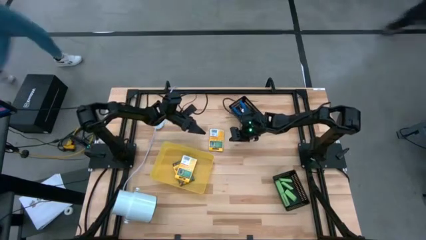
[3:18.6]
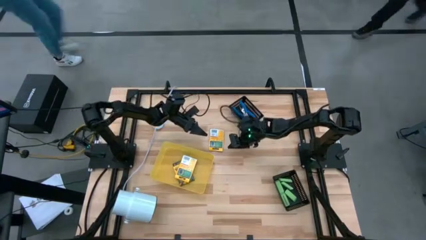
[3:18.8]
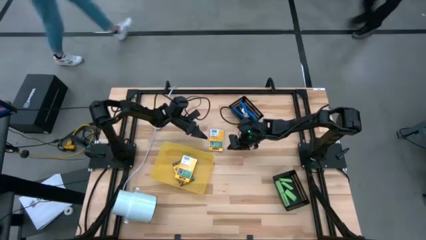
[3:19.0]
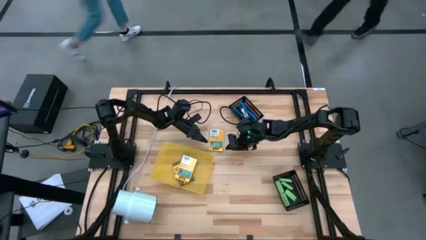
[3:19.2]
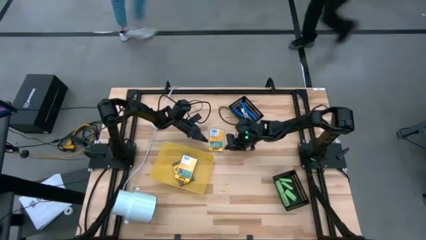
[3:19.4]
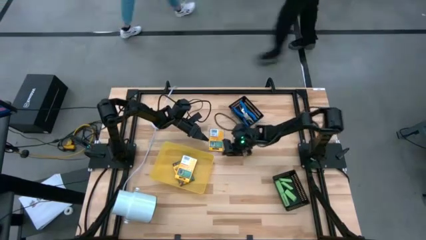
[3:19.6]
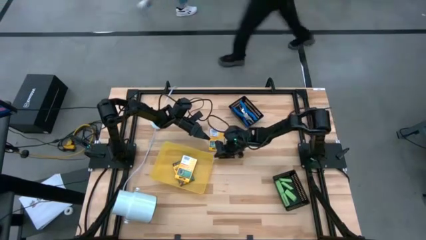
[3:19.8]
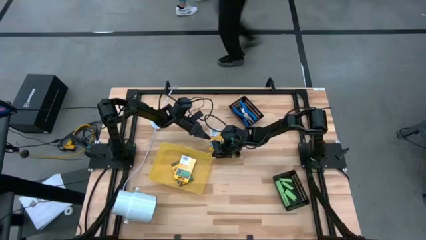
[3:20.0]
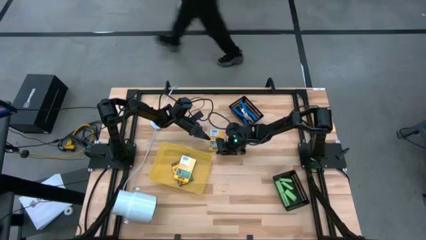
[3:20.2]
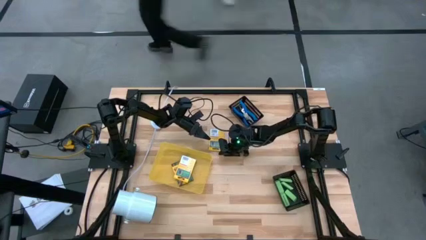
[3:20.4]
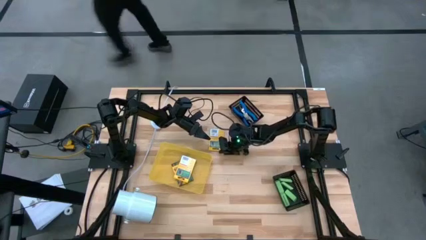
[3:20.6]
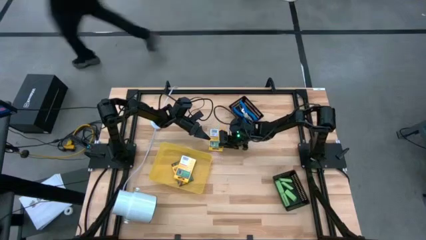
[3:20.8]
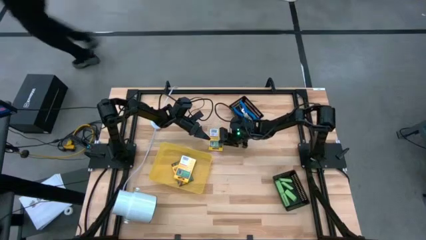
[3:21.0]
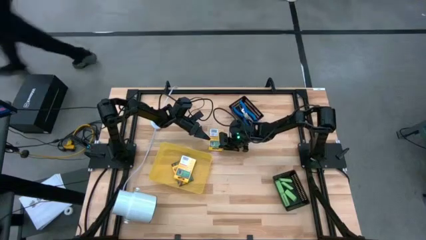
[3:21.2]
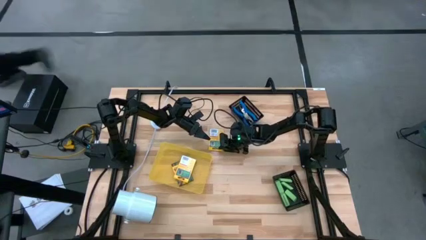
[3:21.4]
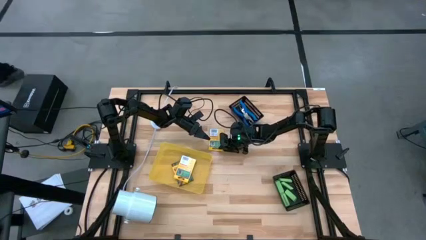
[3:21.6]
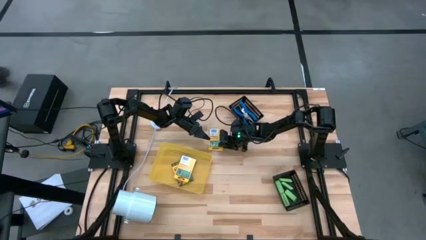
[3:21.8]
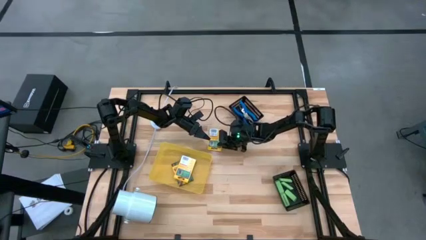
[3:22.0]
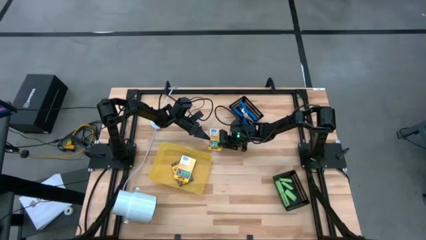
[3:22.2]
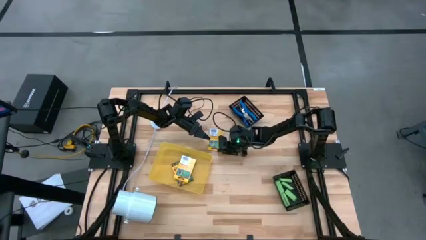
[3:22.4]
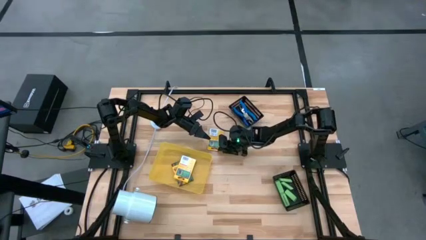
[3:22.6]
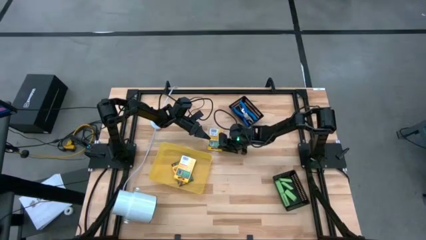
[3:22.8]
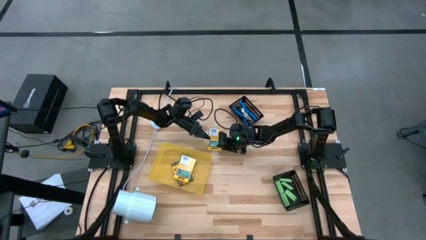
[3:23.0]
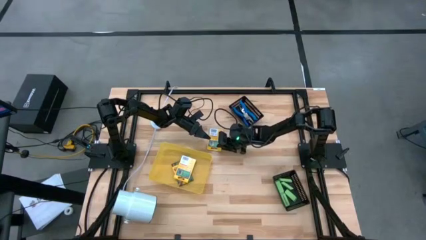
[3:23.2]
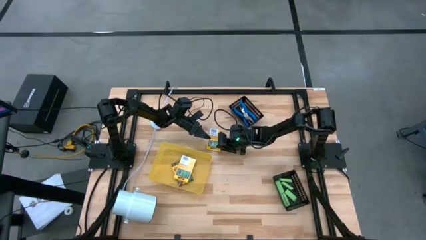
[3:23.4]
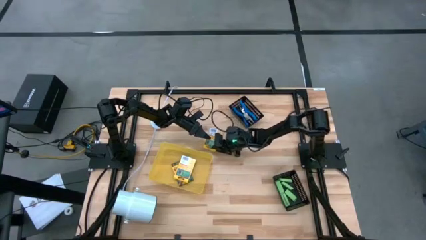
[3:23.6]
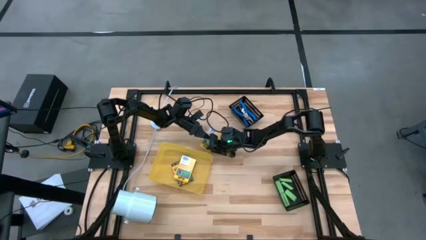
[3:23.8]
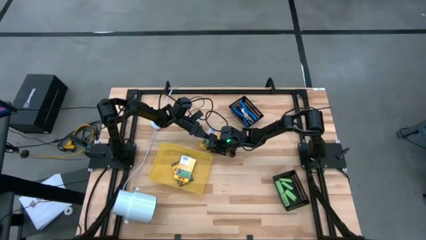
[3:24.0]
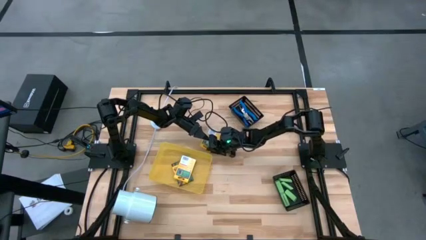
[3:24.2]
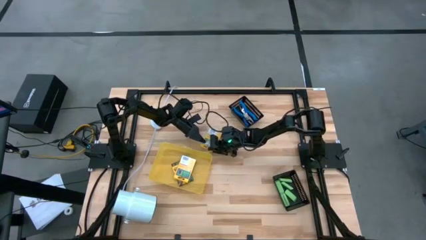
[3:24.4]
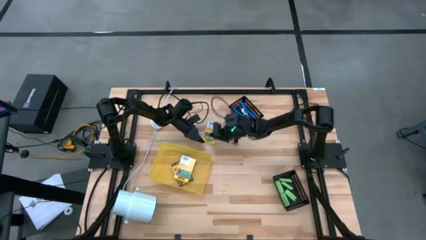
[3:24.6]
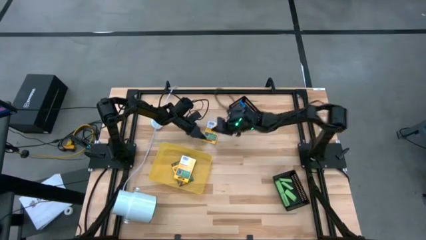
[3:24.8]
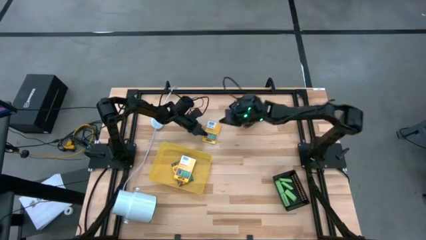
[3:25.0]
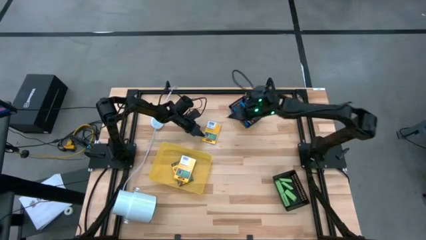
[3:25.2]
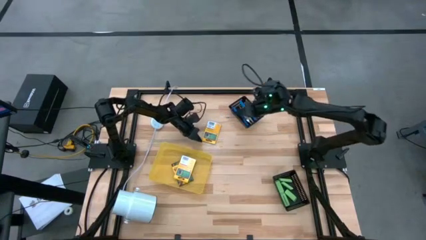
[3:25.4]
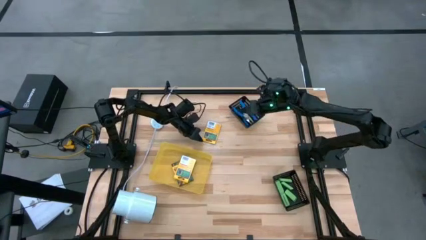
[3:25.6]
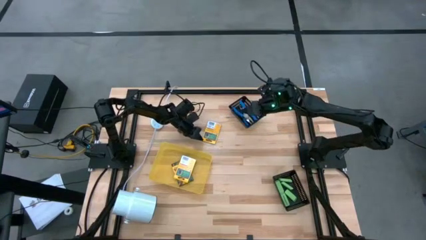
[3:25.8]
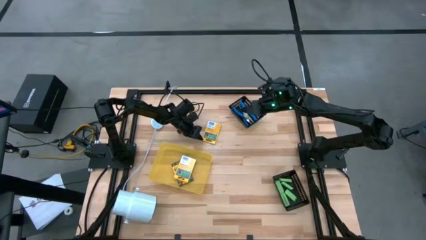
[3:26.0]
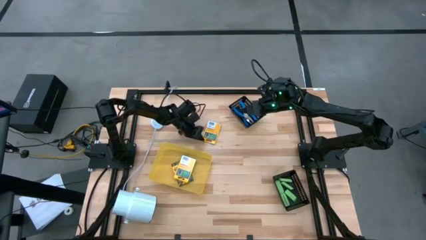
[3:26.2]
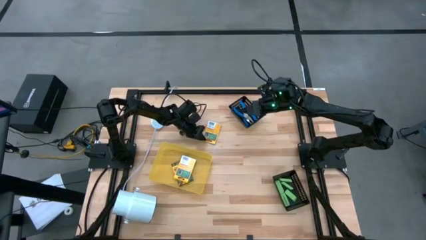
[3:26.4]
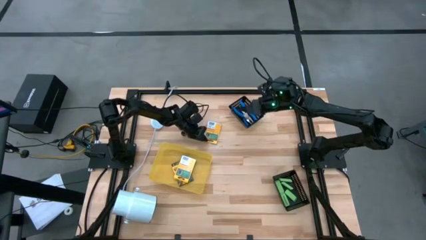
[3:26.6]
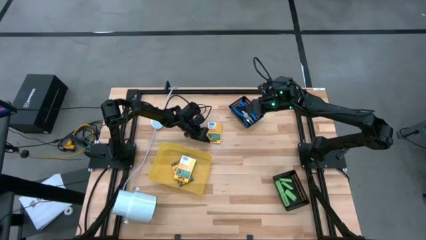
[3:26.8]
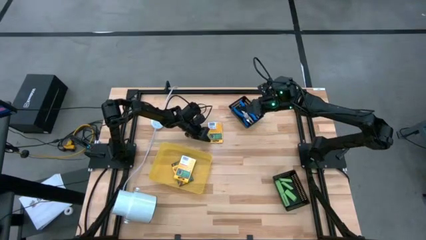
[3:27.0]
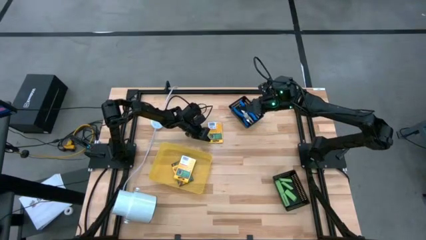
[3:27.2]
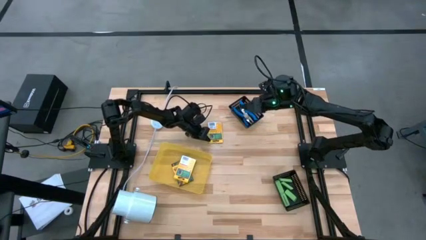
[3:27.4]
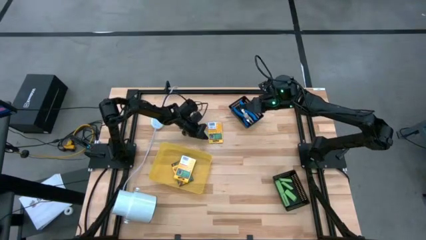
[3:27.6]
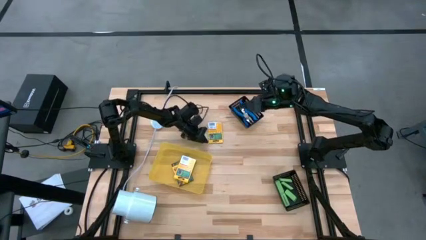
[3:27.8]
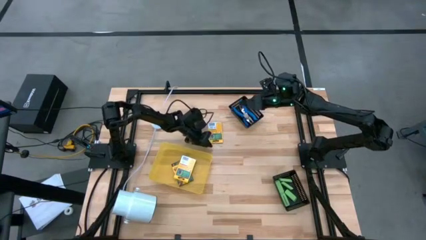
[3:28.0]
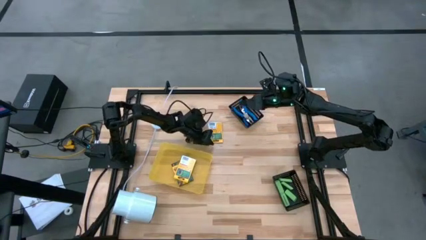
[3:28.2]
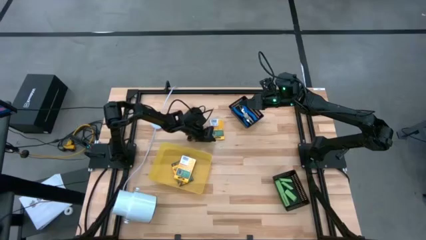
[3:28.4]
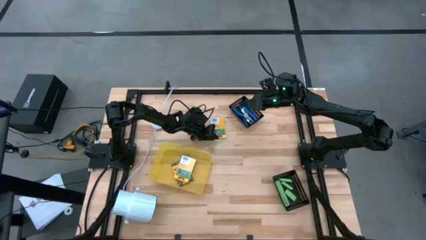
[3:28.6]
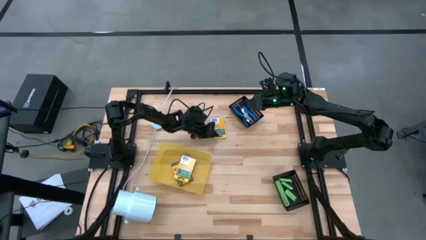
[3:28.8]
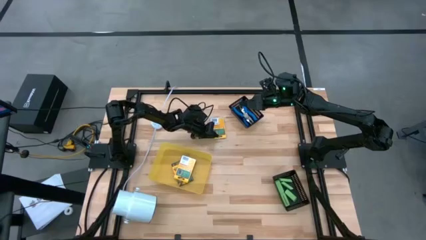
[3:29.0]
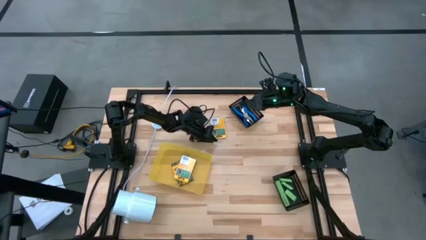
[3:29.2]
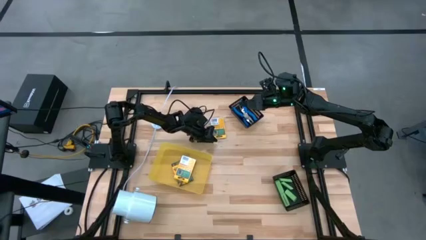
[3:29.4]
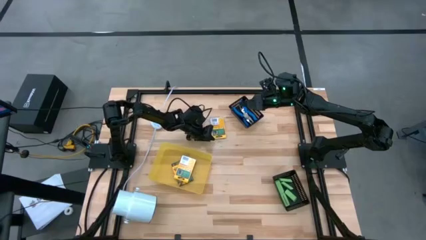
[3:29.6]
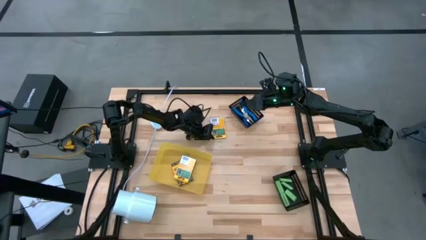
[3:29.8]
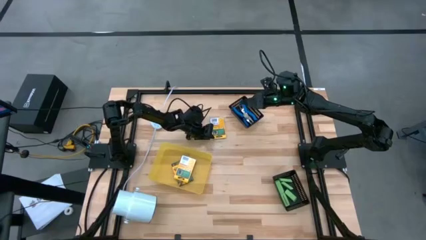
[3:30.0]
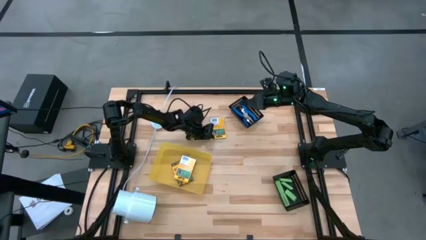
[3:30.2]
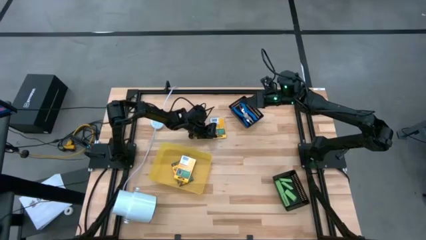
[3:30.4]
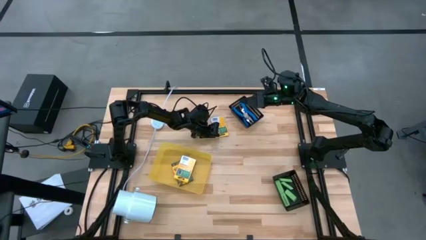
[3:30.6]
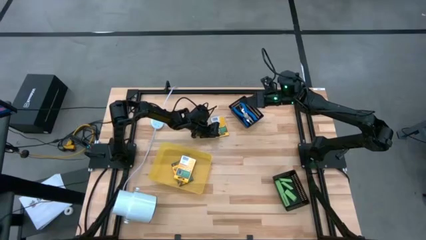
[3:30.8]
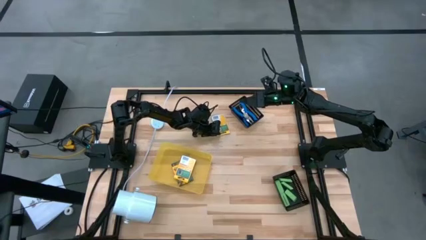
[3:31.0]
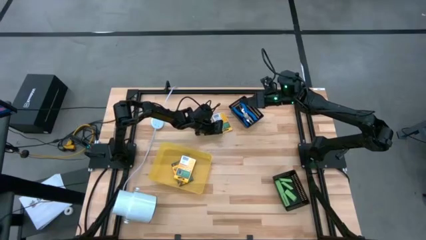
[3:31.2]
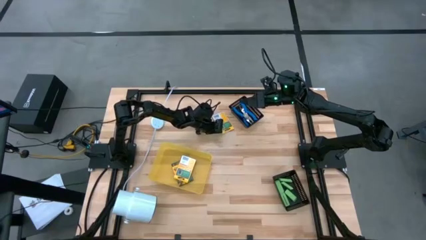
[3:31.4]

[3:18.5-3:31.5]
Task: Pick & Place School Supplies
Put the pack of crayon into the yellow bin

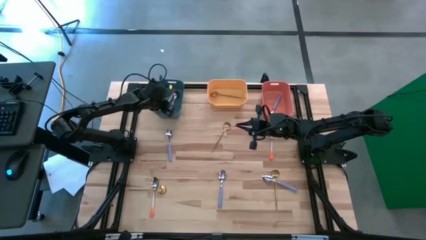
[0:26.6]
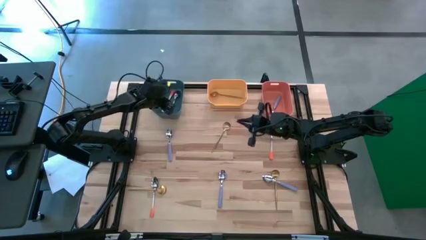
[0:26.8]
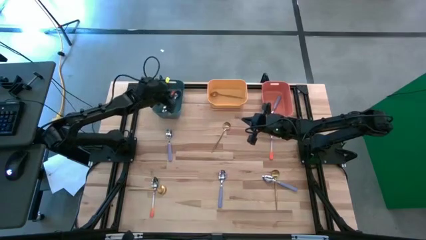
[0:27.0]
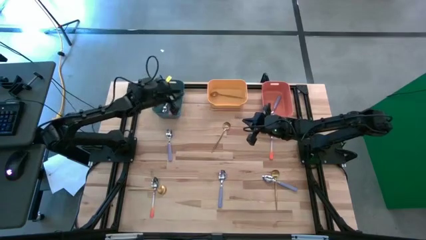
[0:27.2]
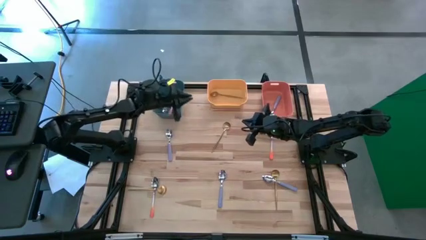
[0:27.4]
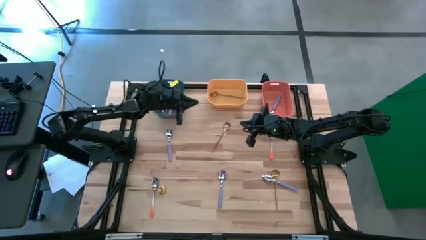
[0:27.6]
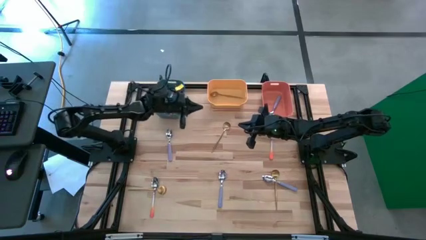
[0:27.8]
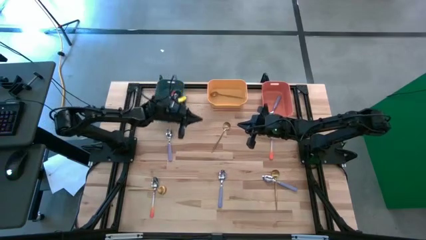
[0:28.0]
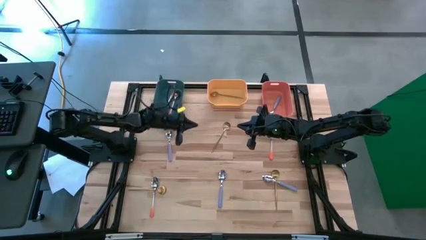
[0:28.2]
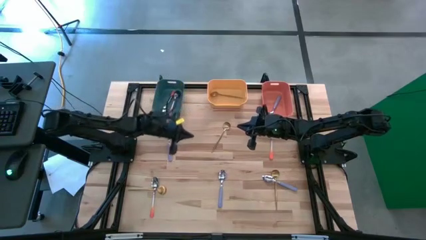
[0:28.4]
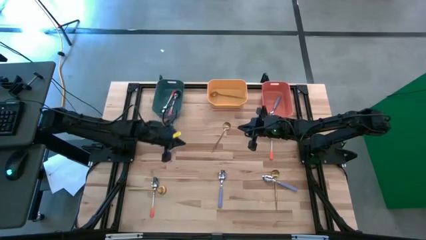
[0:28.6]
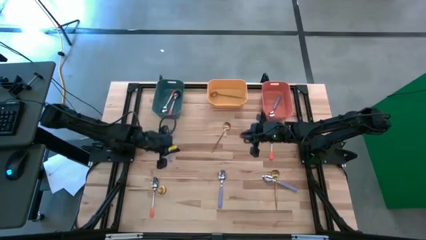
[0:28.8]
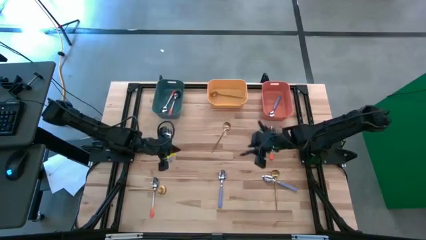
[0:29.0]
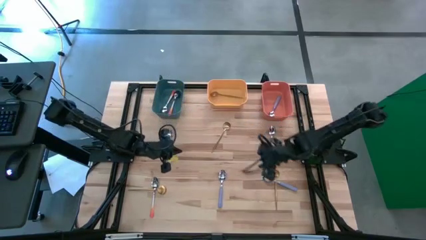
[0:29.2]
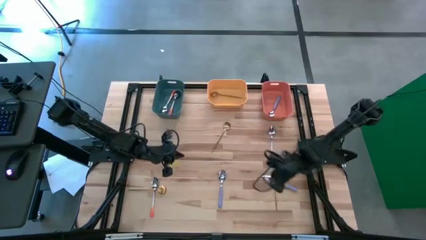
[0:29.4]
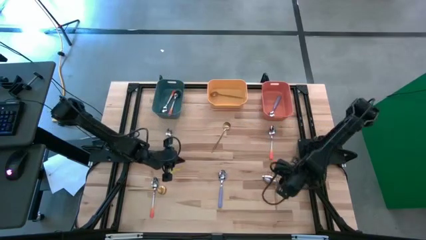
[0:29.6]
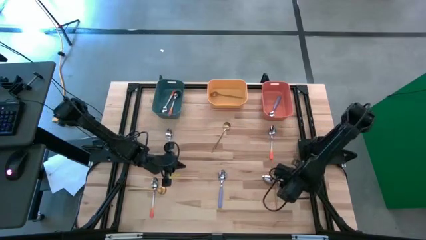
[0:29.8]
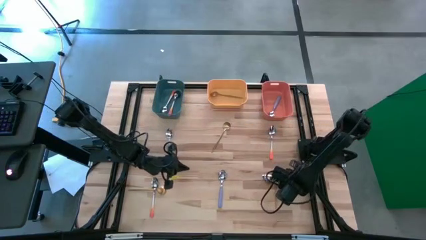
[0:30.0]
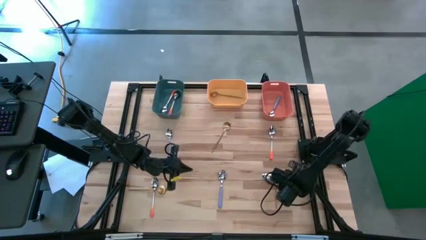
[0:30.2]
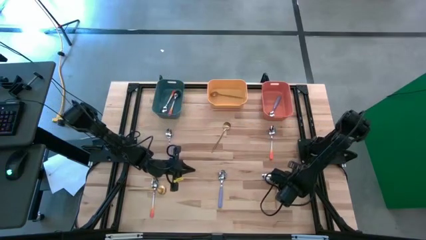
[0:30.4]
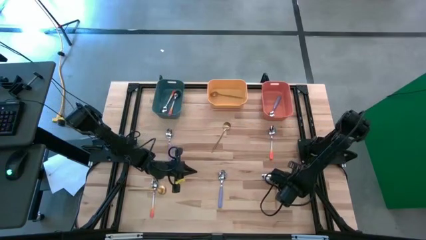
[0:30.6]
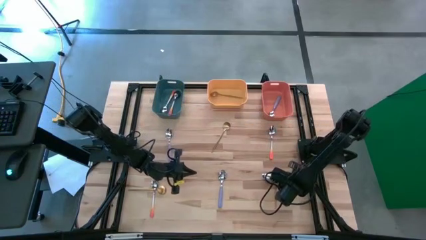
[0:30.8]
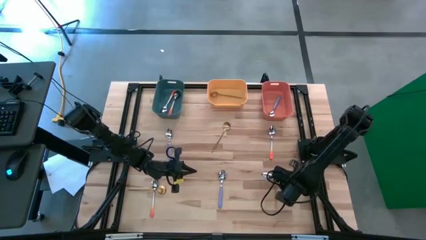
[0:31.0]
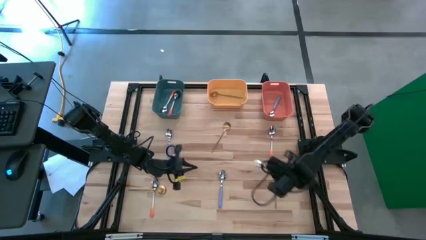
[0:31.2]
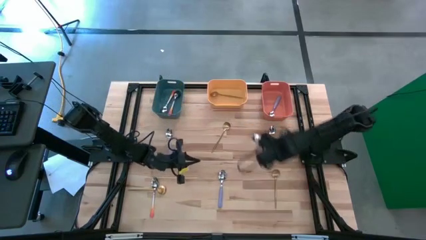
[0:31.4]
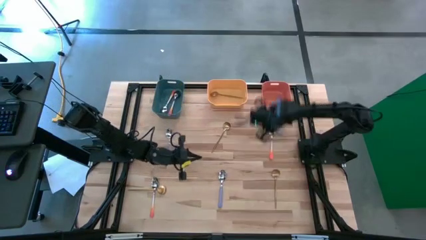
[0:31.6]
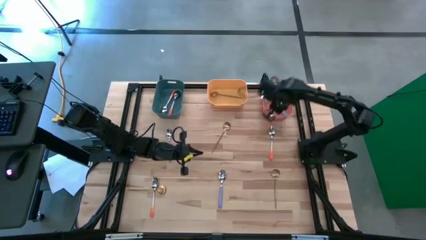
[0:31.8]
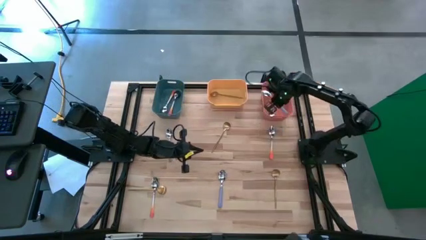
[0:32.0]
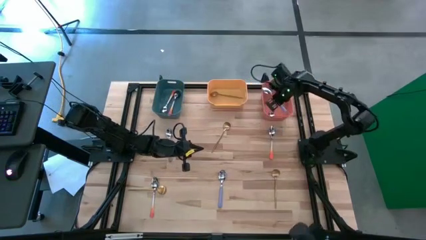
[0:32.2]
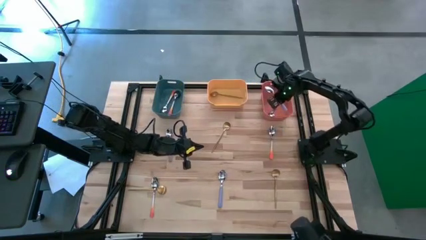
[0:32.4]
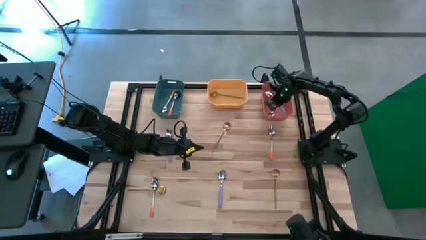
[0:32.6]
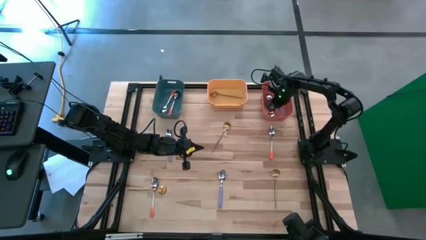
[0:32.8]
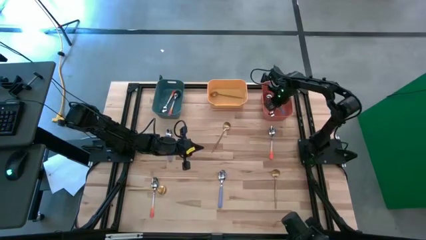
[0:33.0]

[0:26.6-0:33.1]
Task: Sort silverware by color (type)
Put the bottom right purple spoon into the orange bin
